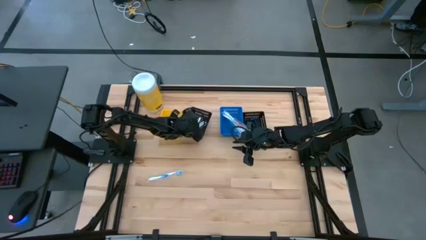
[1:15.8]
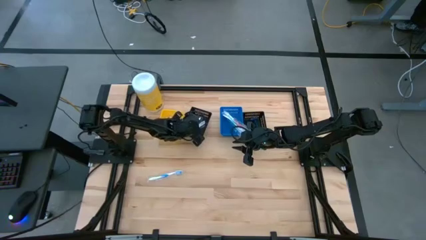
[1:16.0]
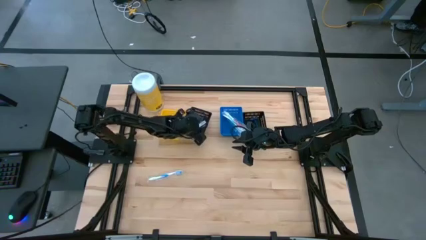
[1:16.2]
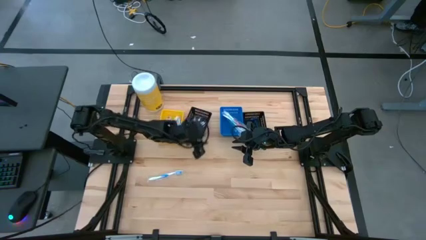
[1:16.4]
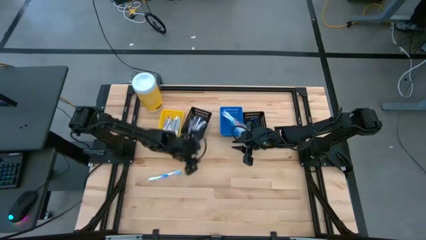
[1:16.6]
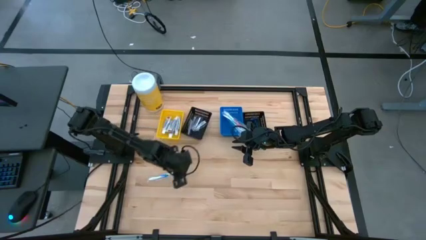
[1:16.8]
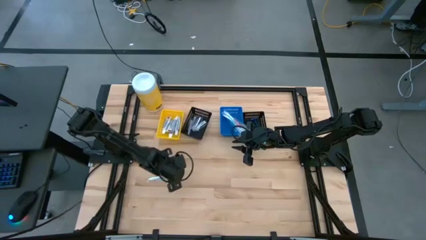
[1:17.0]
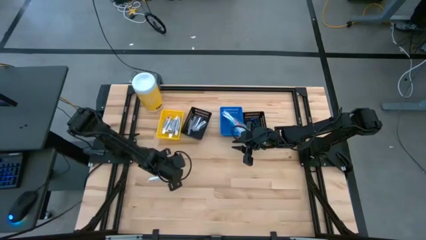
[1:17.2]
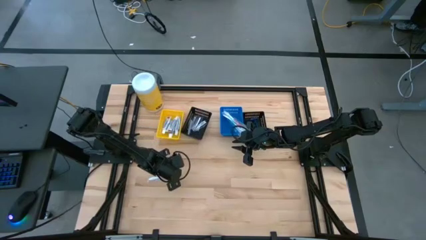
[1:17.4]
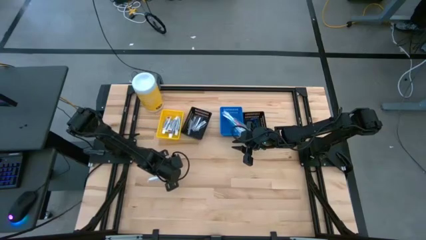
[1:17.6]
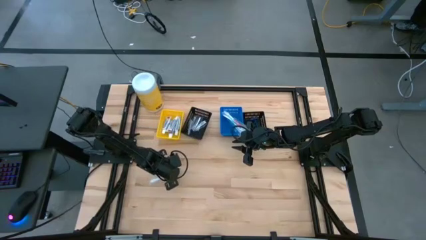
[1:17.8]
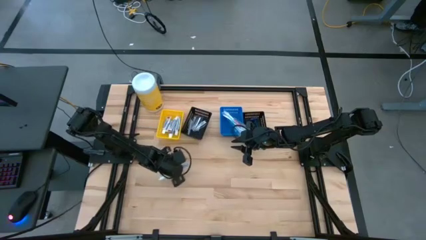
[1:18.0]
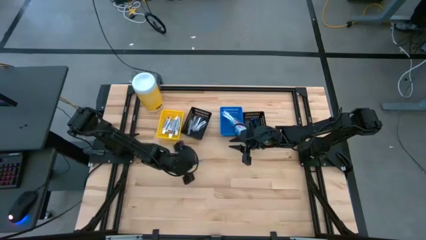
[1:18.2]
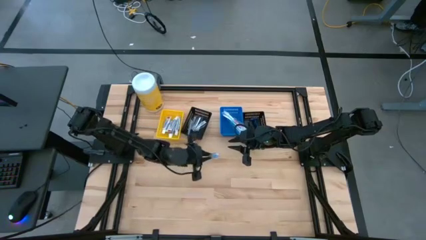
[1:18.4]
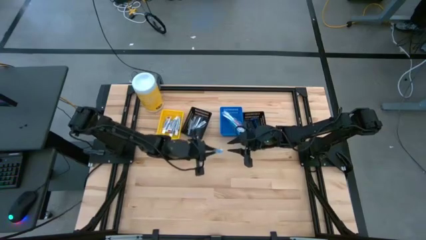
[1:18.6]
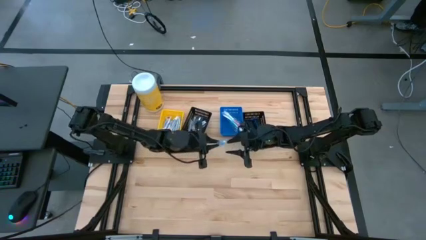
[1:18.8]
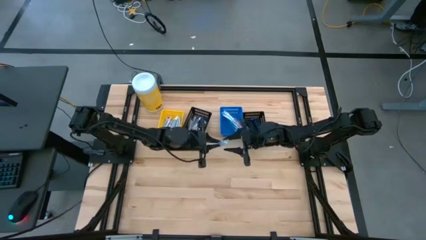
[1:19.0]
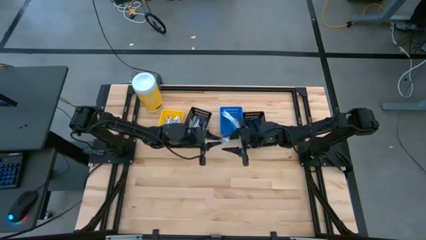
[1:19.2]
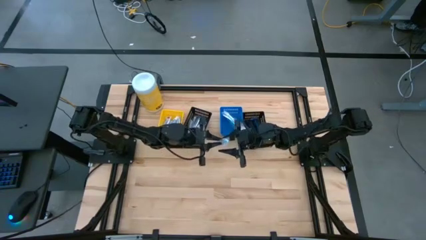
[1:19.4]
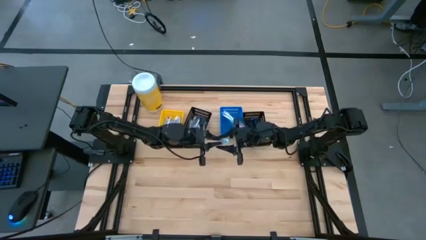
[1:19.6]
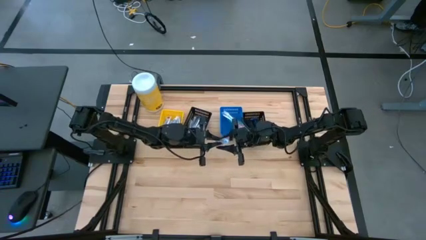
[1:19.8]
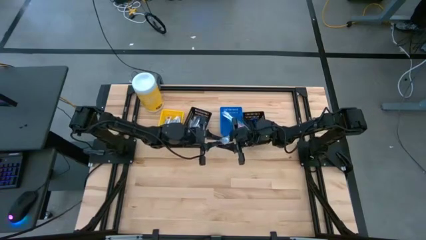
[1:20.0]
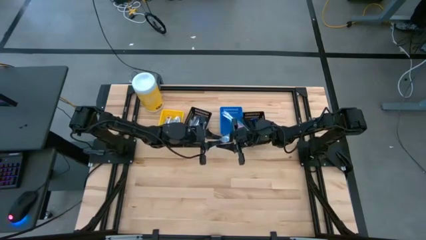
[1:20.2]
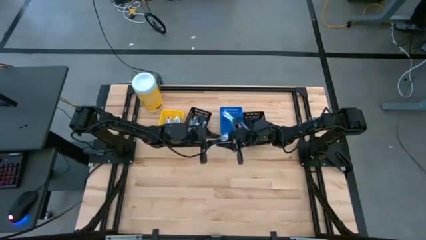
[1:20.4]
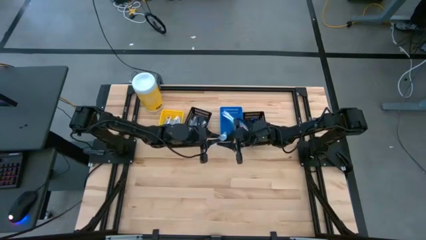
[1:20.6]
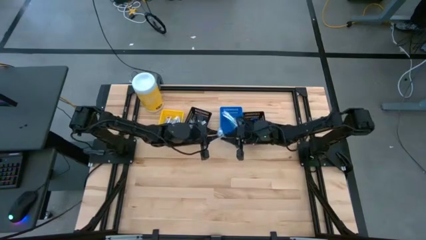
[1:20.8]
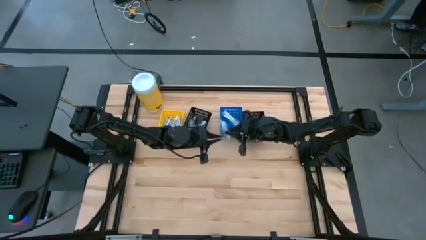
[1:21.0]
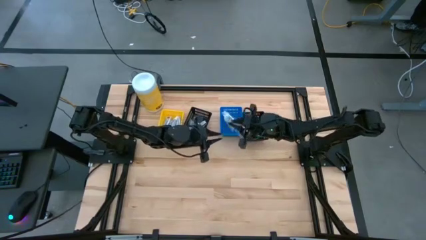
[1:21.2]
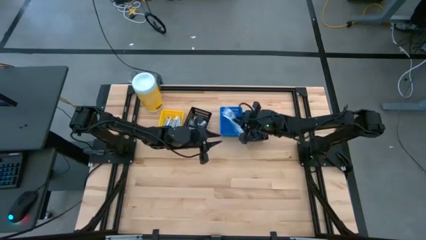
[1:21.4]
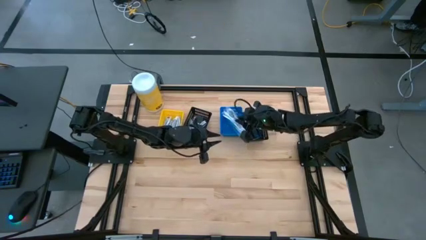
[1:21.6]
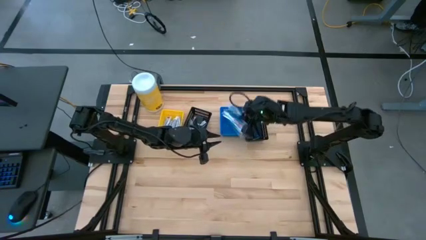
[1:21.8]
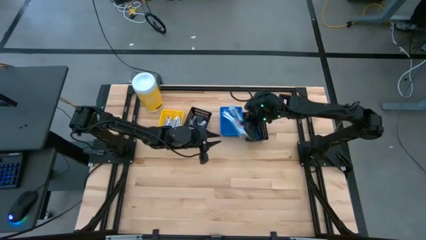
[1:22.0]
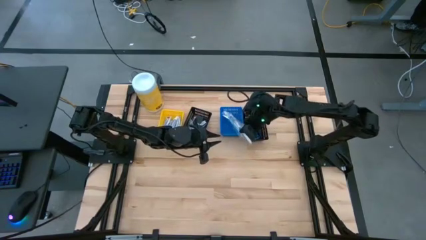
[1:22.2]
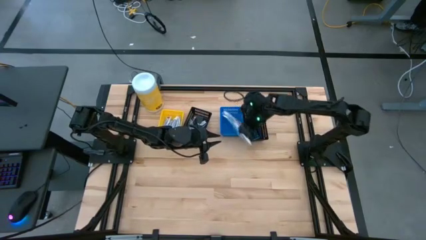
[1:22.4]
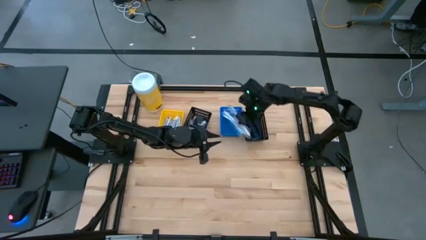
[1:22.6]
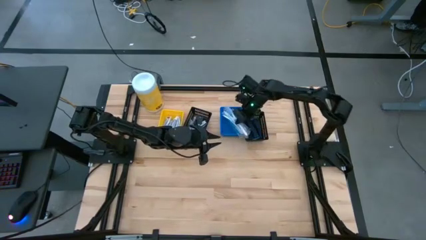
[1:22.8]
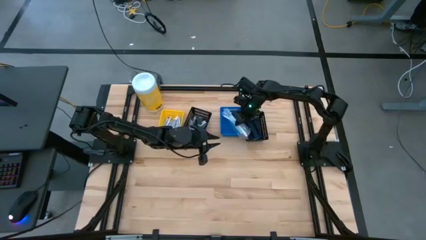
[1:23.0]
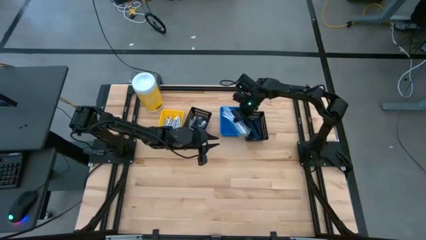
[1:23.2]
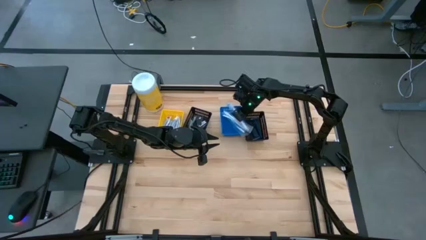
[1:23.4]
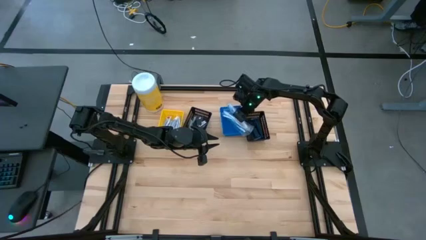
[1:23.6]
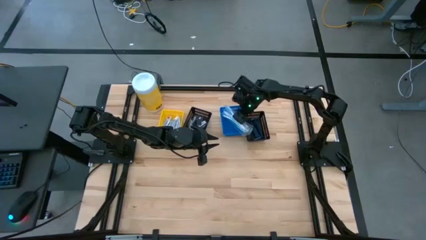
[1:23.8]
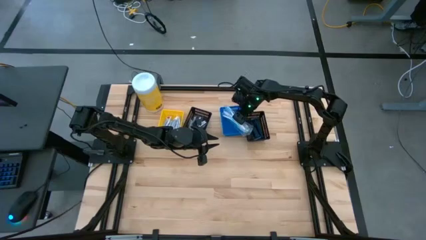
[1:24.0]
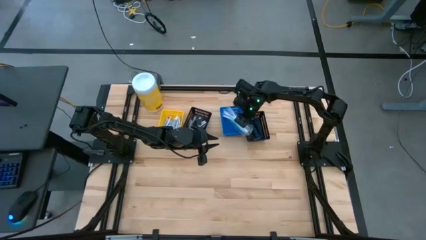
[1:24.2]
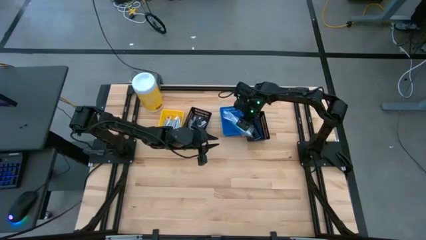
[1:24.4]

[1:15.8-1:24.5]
Task: Pick & Place Travel size toiletries
Put the blue toothbrush into the blue bin

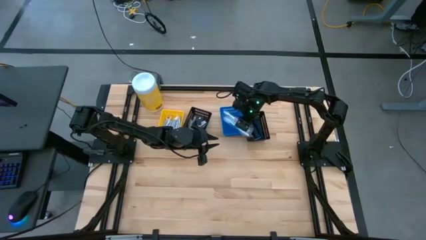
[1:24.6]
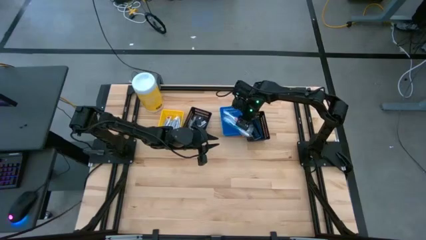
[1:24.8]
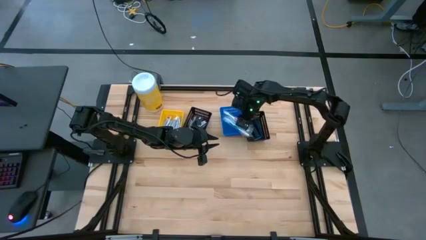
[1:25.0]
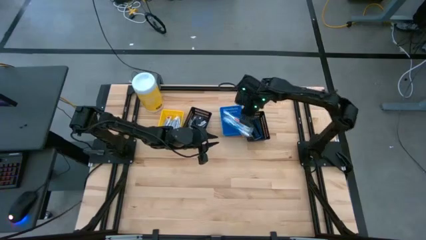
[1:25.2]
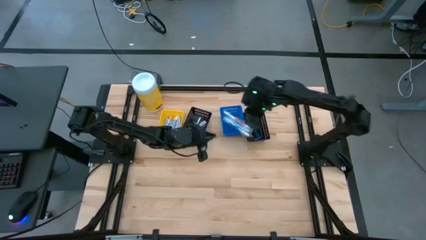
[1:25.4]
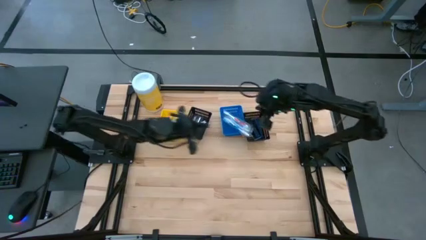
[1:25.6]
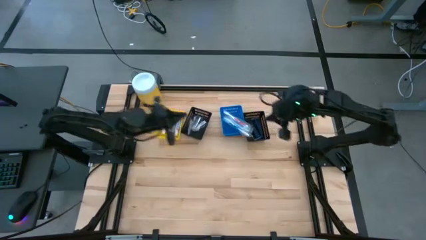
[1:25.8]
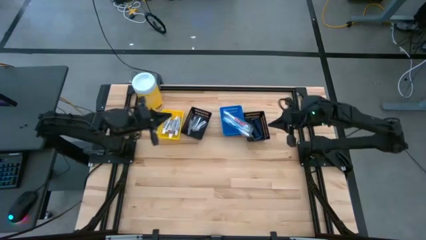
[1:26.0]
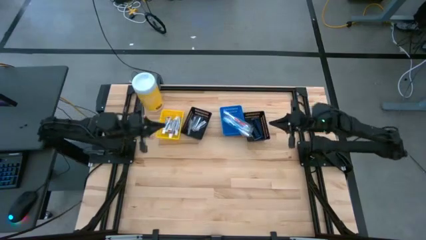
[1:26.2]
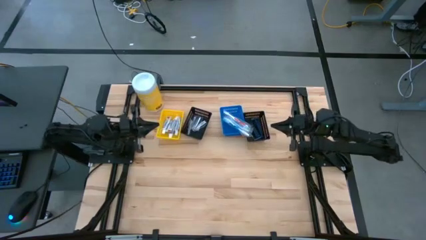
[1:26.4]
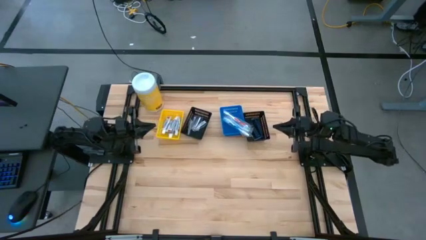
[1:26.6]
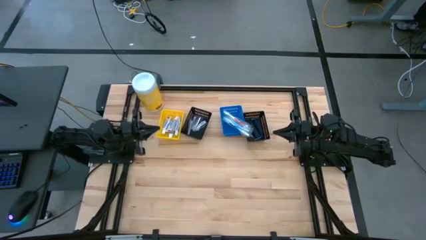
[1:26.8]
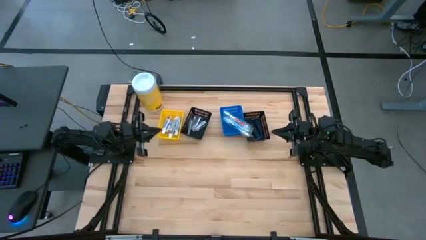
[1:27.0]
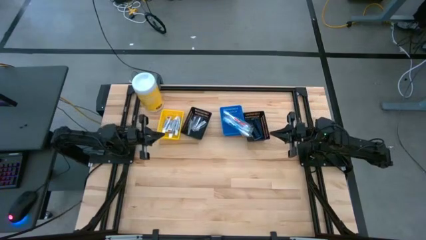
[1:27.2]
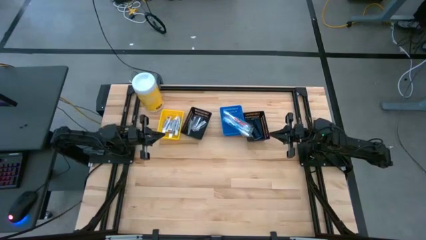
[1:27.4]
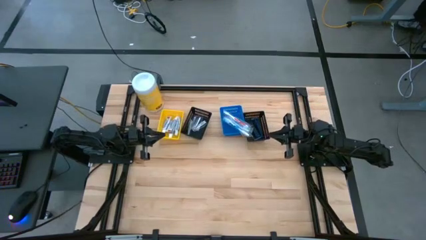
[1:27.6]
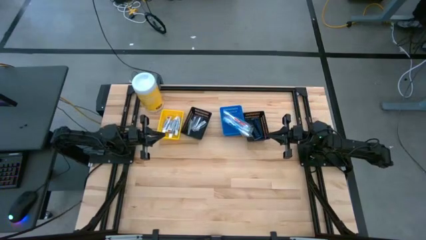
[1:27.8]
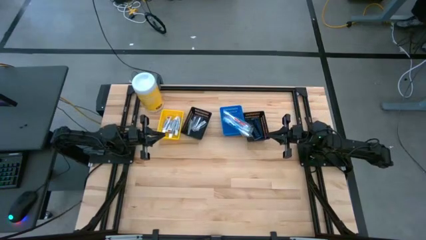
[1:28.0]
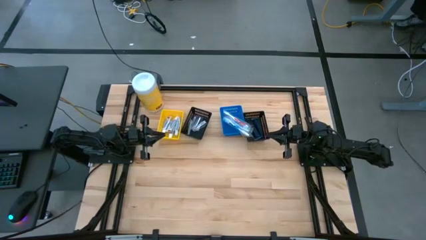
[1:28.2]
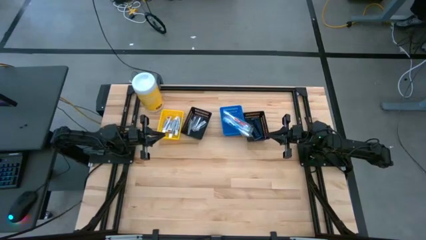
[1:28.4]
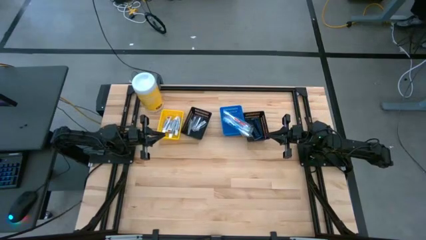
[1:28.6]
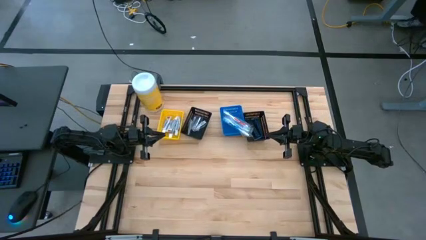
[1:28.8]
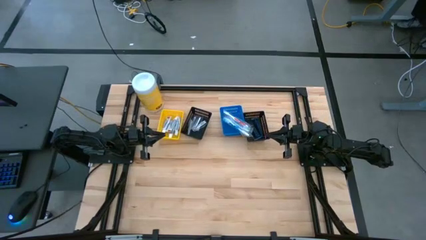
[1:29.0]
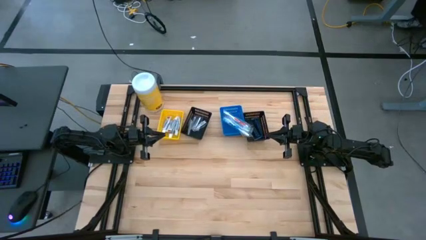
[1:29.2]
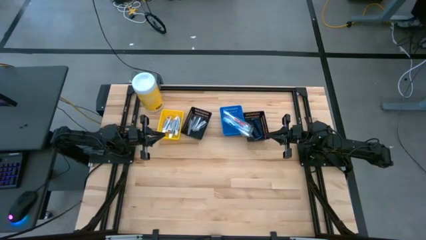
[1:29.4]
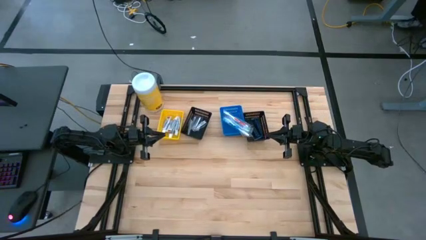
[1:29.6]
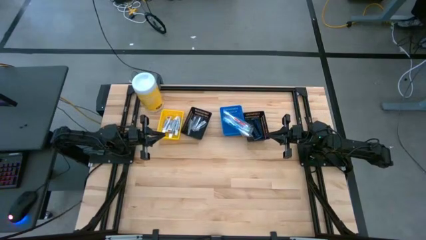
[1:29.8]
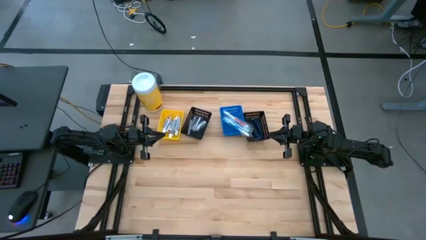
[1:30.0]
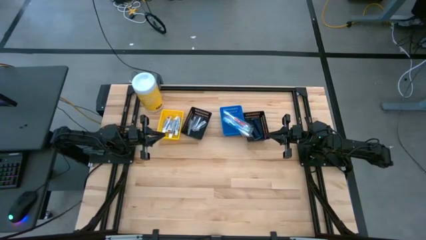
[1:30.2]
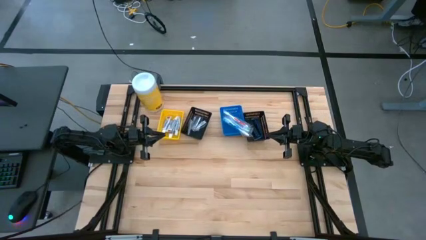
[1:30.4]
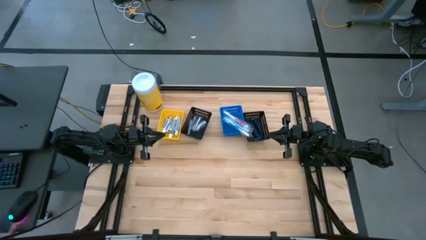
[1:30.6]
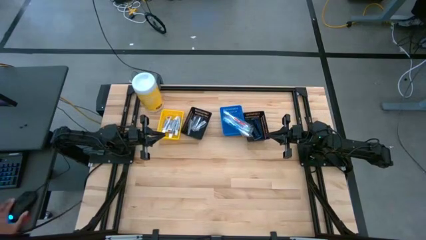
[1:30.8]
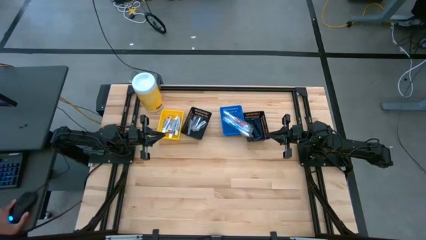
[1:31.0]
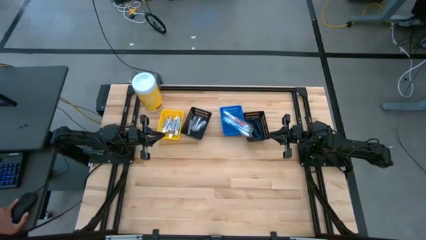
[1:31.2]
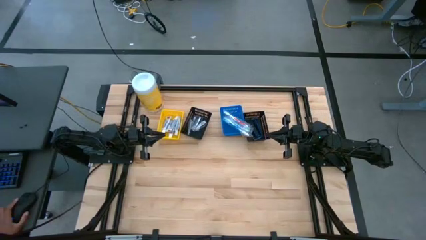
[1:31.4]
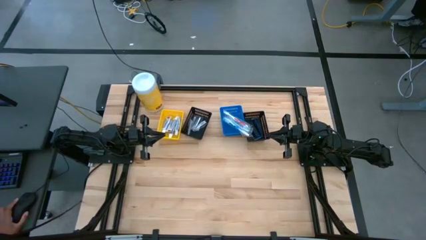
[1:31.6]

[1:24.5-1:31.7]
Return to Home Position

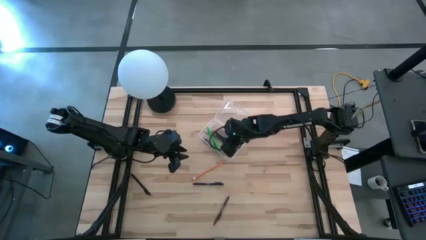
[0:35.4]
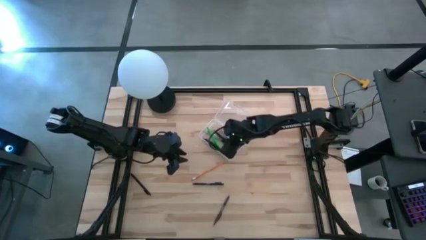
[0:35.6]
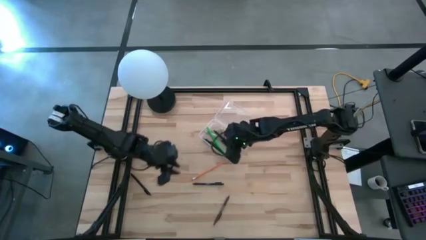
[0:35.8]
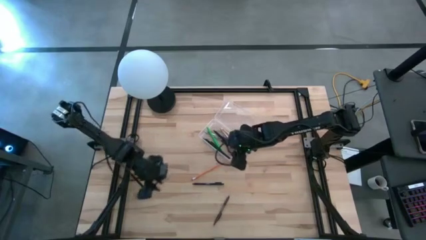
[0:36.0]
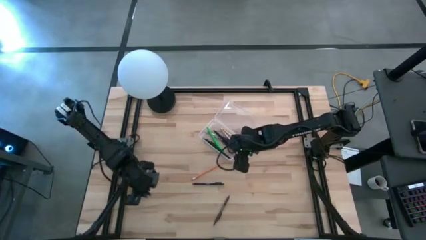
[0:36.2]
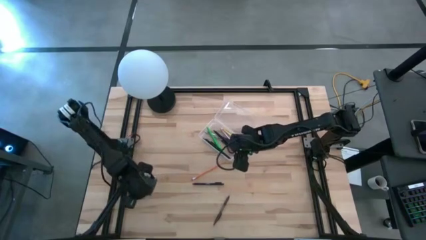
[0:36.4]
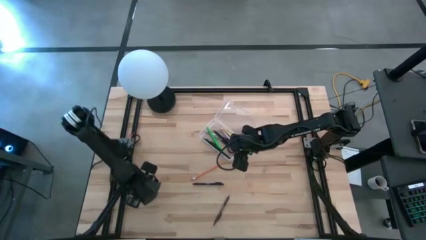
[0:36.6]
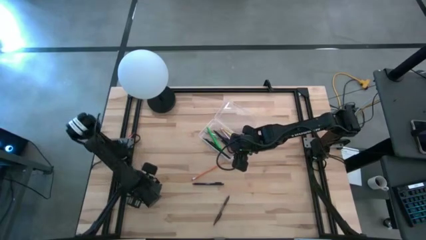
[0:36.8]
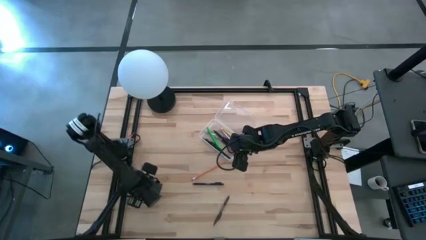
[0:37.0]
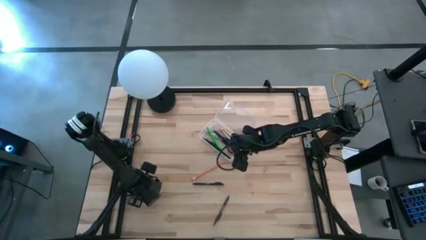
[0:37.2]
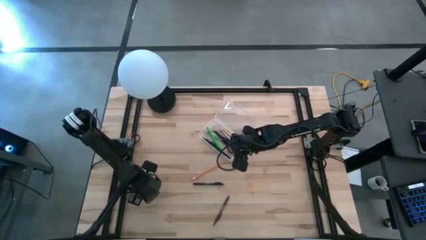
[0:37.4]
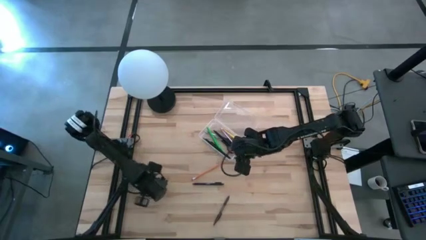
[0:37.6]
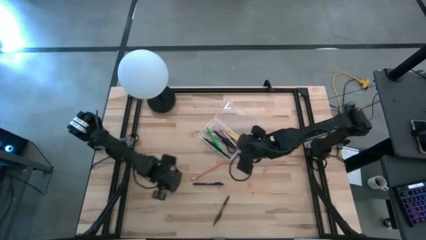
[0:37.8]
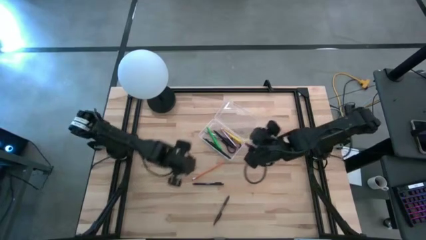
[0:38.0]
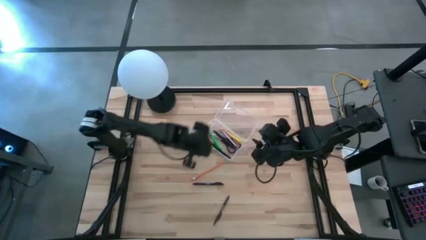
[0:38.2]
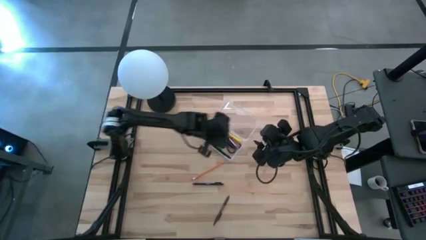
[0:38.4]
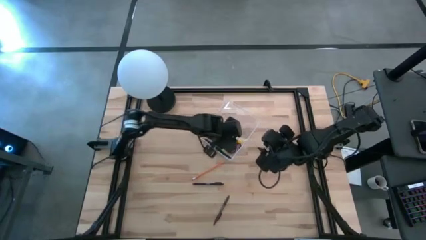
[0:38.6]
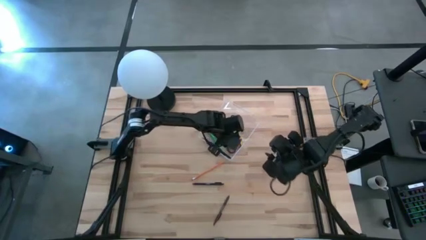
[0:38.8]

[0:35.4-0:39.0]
Task: Pick & place school supplies into a supply box
Put the black pen into the transparent supply box
